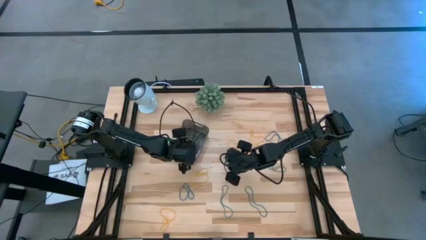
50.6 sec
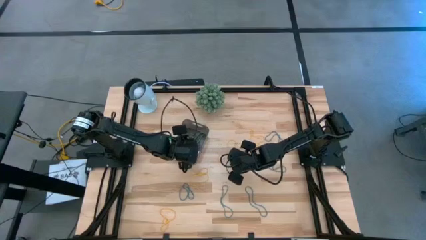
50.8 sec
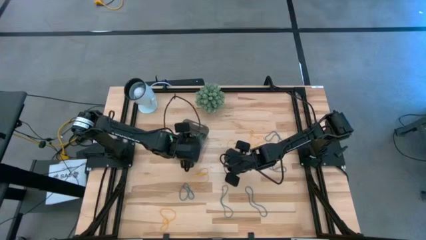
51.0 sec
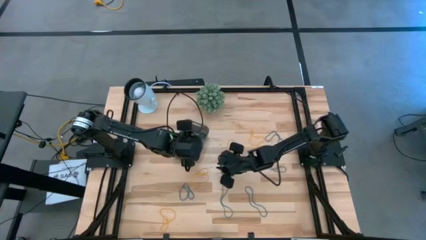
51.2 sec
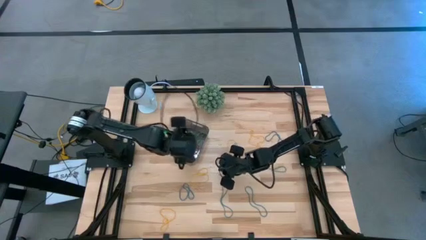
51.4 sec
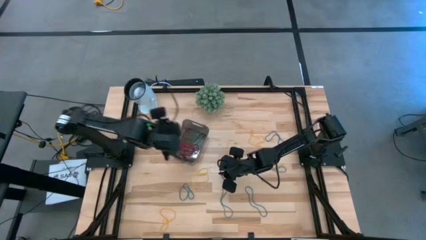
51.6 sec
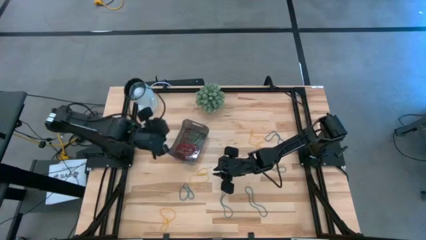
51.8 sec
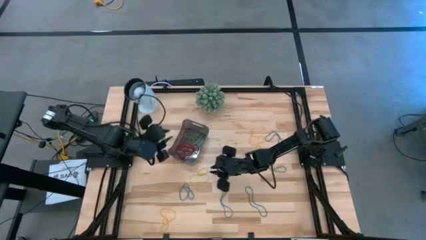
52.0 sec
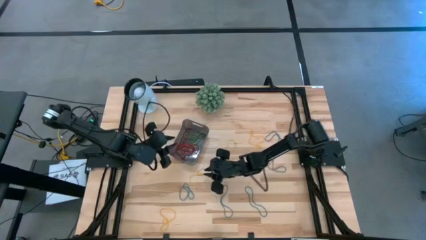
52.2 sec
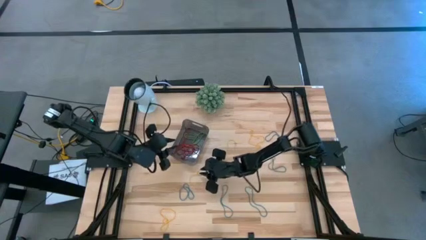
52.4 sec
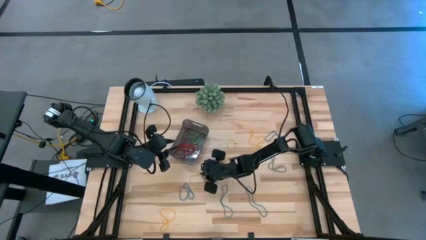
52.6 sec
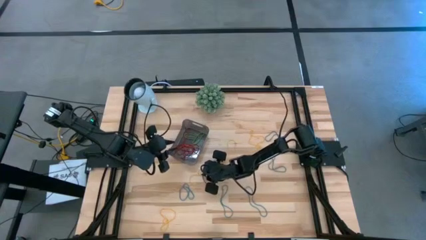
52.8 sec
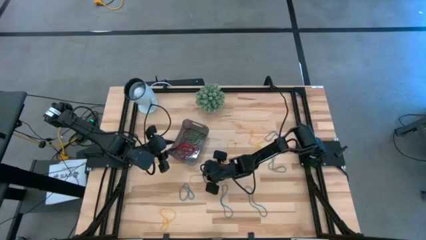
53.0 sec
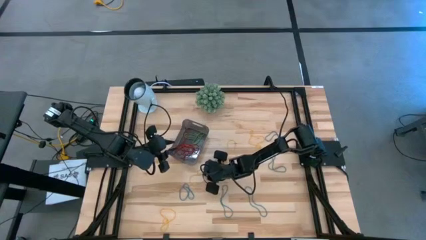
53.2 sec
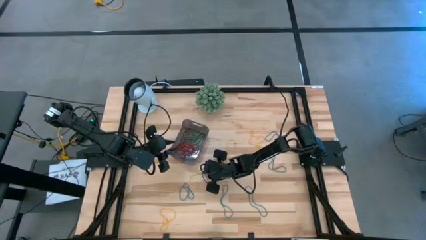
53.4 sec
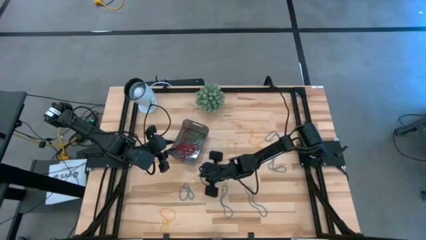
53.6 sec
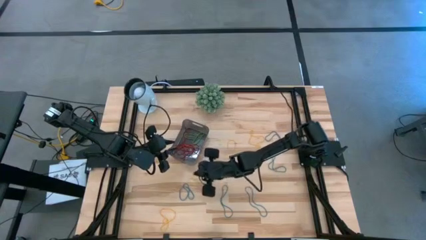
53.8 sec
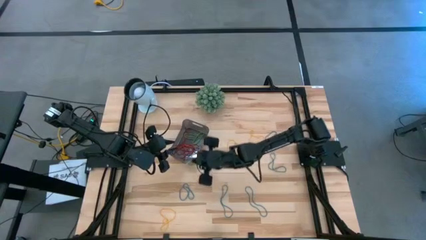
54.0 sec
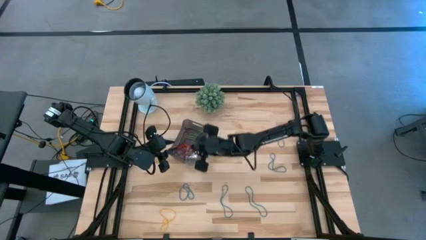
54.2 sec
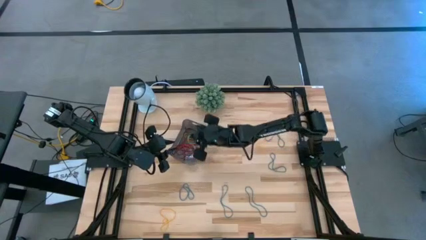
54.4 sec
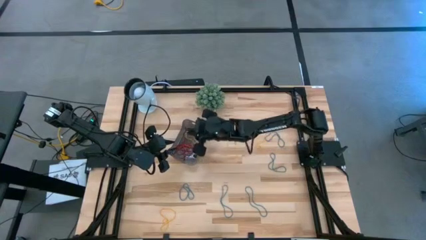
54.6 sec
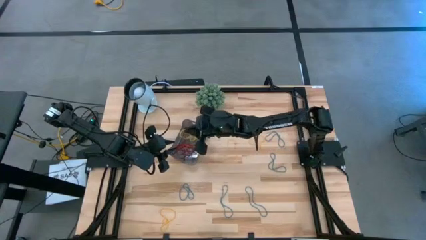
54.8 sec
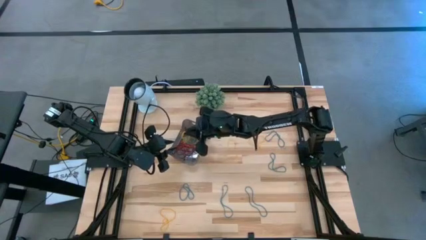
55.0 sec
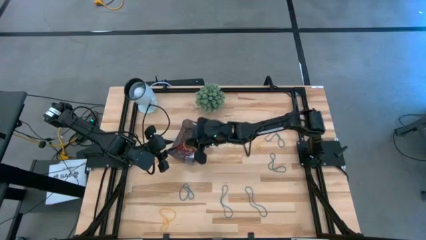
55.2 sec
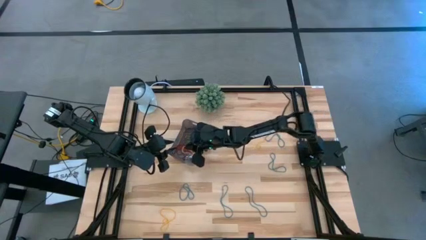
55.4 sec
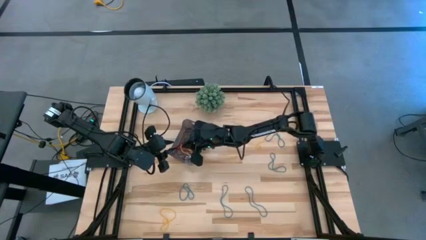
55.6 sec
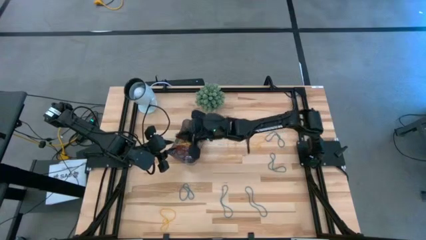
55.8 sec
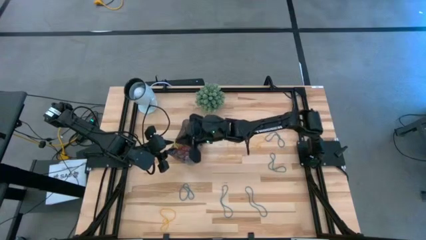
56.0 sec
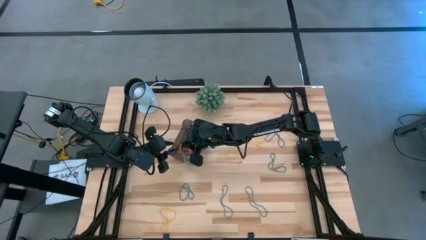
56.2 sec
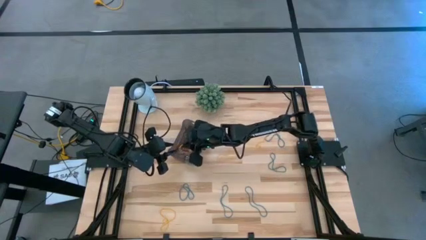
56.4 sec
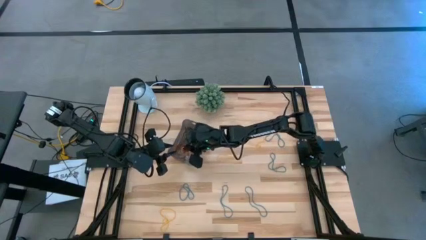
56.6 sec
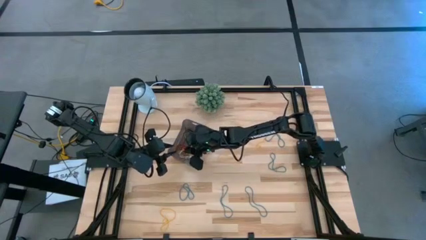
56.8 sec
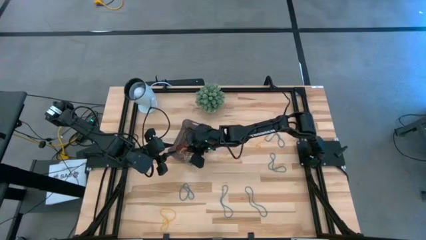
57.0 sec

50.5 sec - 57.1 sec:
Task: Pick and place items into bin
Put the yellow rubber band into the black bin

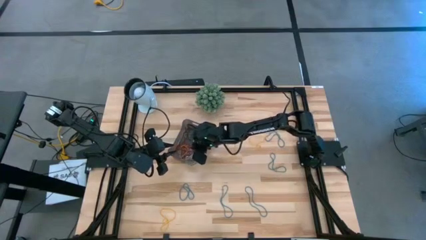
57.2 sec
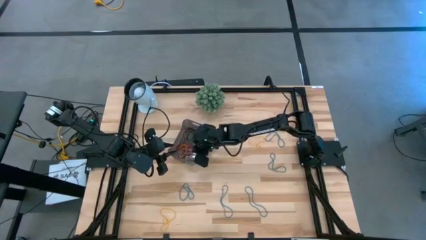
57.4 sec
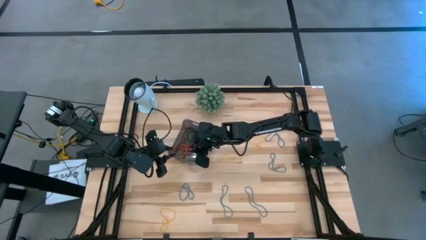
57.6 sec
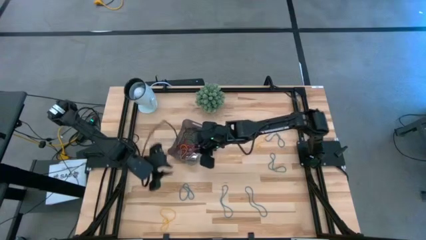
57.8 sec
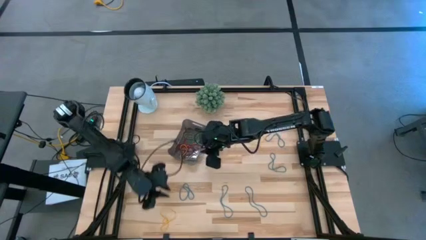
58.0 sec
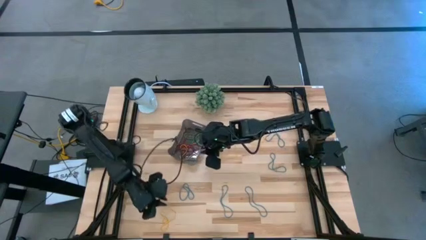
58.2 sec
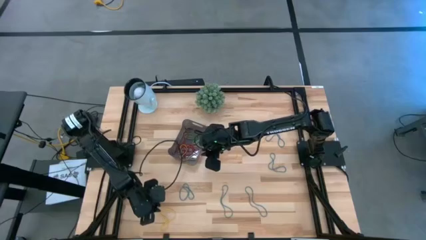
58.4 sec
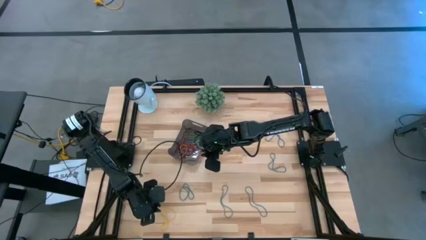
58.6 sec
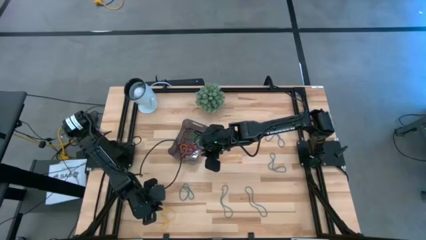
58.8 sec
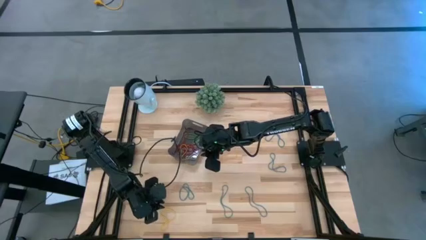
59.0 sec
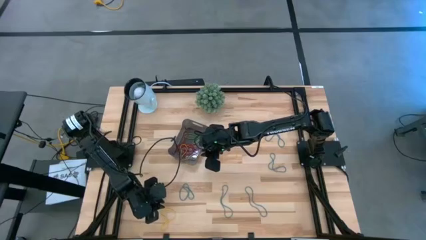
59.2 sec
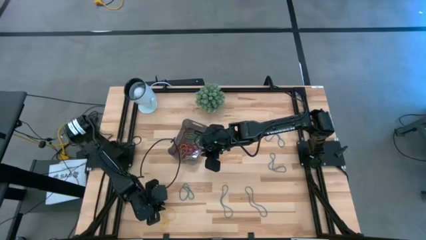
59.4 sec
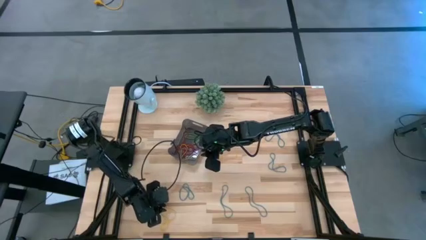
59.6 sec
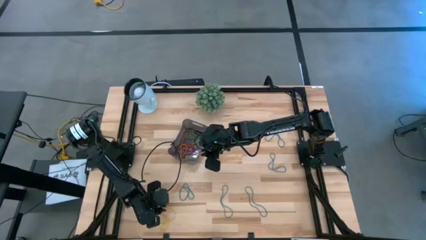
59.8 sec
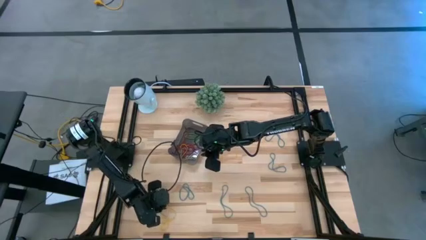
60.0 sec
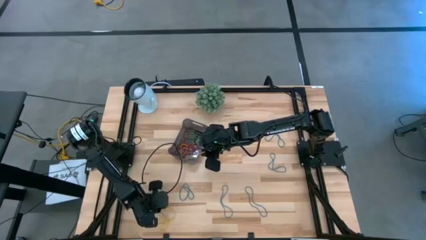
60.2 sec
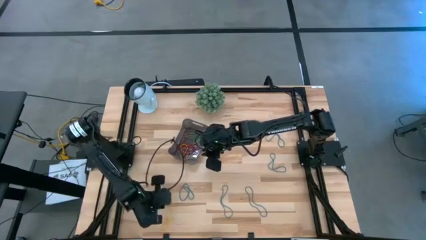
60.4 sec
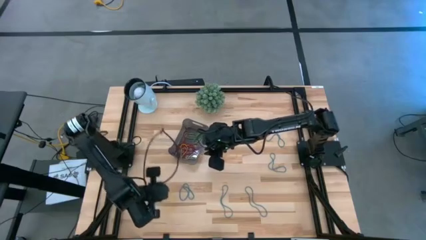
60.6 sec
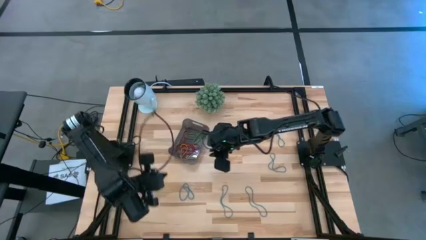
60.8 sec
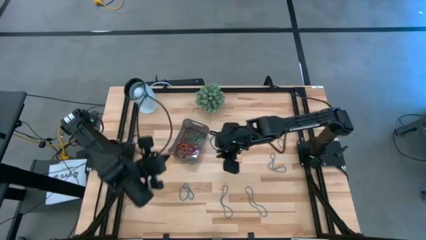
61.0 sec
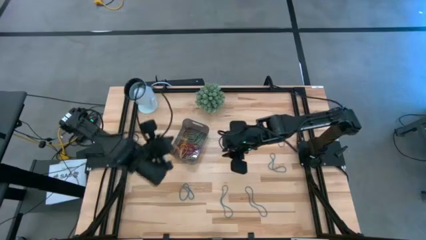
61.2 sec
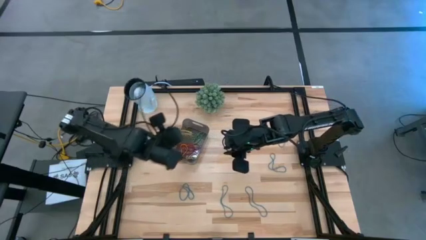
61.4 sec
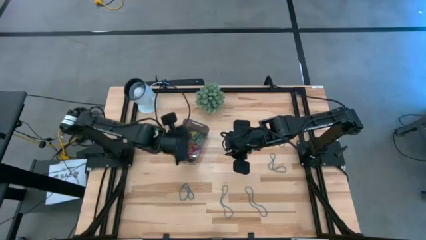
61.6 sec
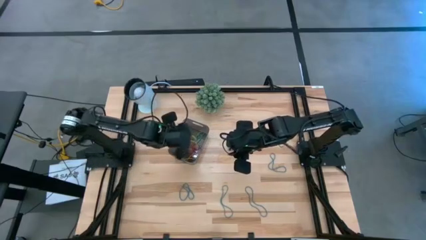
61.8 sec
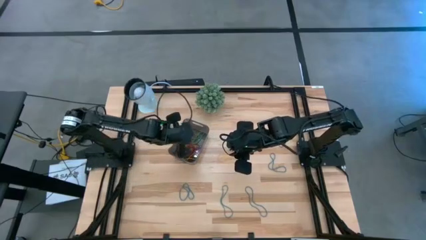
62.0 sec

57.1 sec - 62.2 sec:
Put the yellow rubber band into the black bin

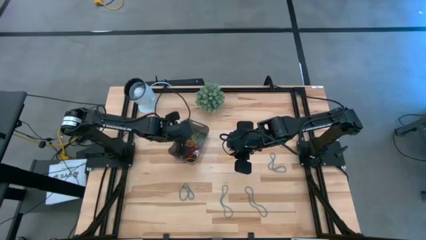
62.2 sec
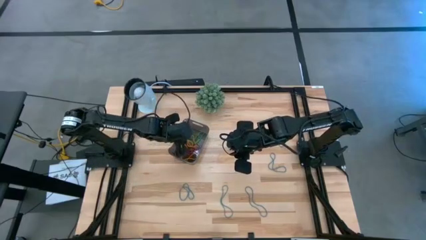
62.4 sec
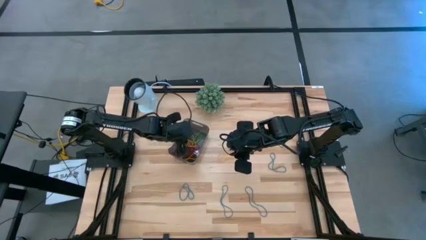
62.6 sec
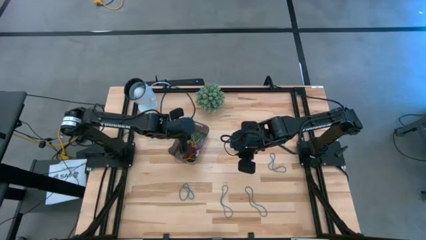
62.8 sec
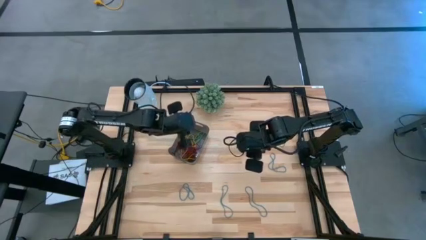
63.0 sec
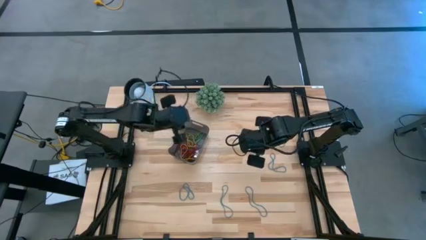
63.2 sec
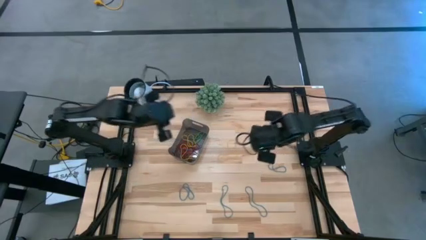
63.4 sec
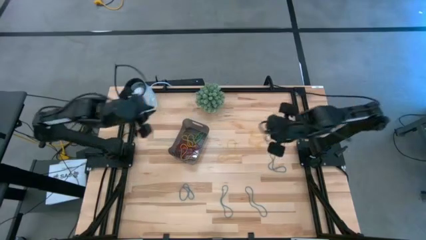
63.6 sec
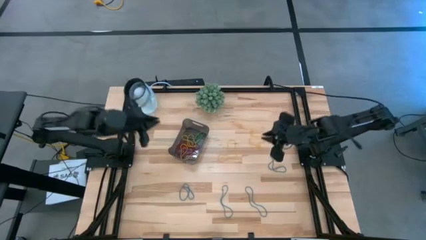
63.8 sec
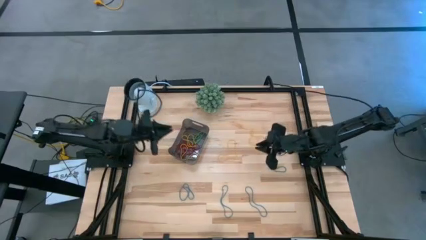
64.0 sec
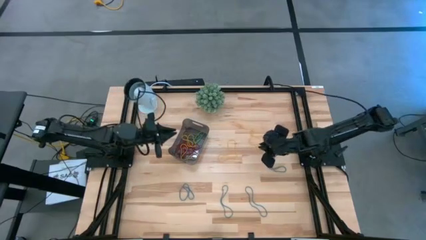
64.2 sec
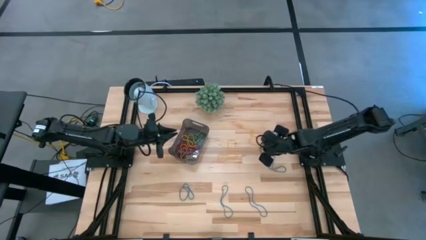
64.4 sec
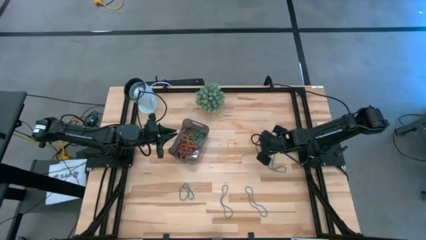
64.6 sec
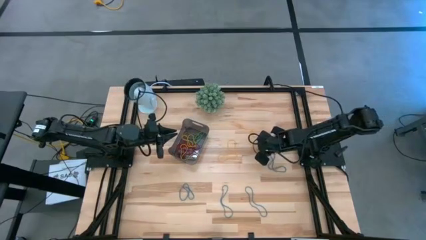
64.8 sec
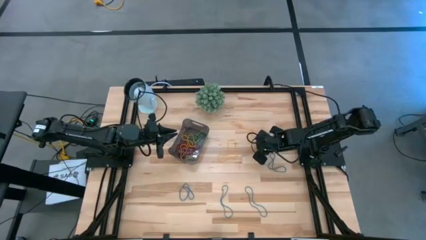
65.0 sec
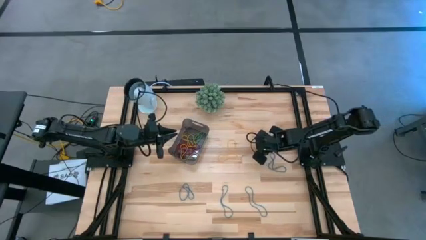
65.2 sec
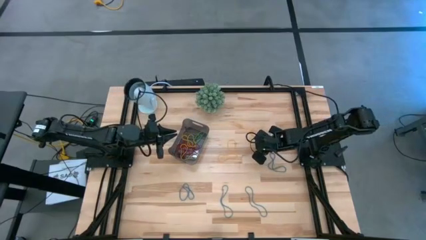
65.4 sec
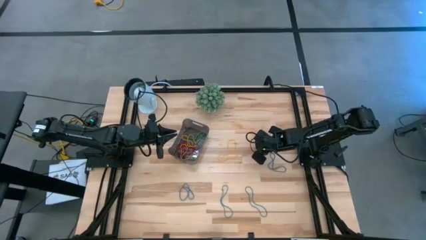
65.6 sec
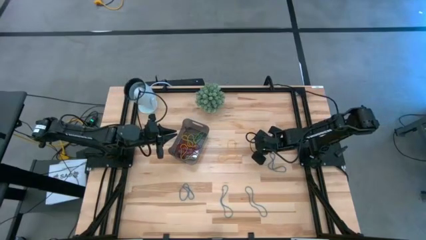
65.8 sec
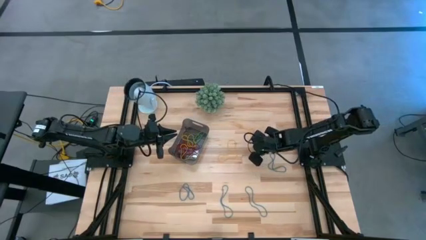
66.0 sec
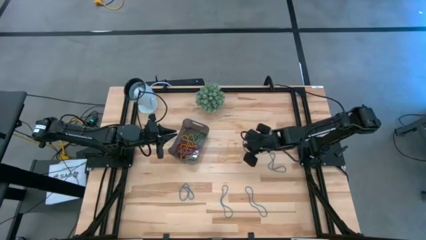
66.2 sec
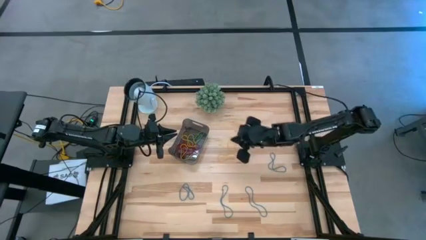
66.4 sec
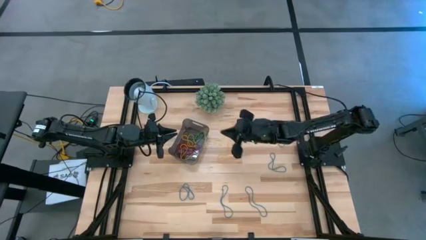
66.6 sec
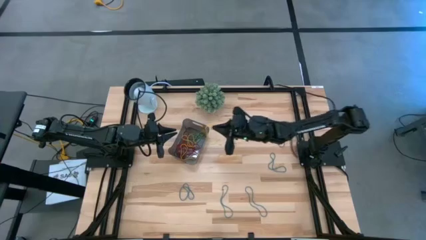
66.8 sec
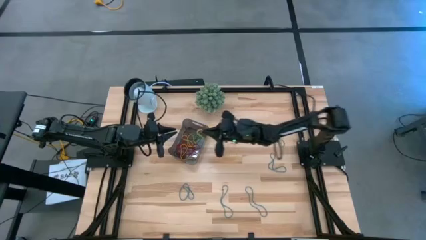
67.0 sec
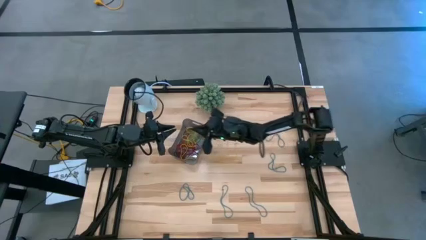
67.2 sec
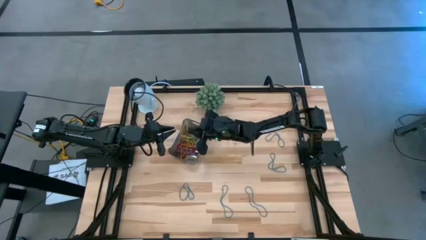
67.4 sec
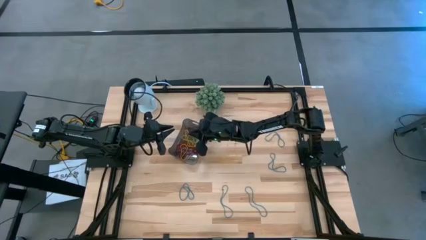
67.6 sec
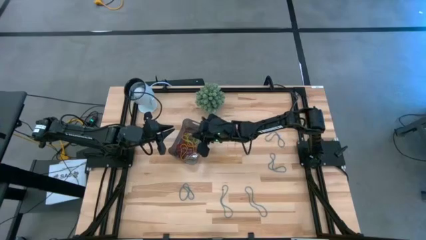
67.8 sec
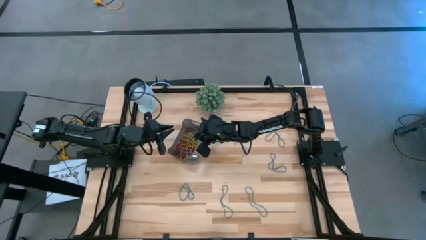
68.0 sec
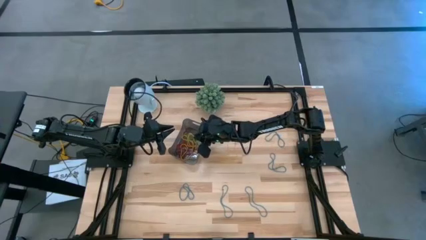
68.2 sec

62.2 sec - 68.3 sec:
Put the yellow rubber band into the black bin
